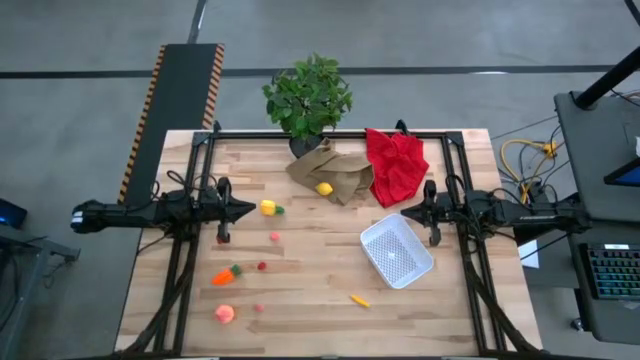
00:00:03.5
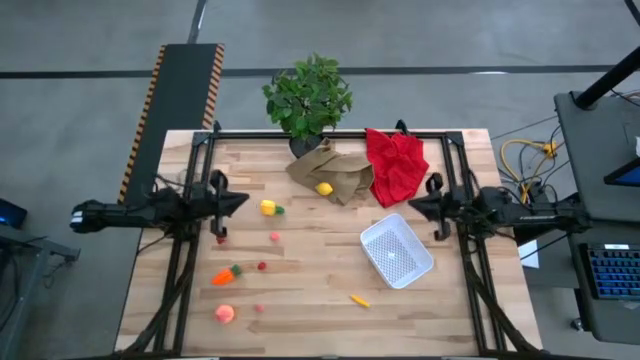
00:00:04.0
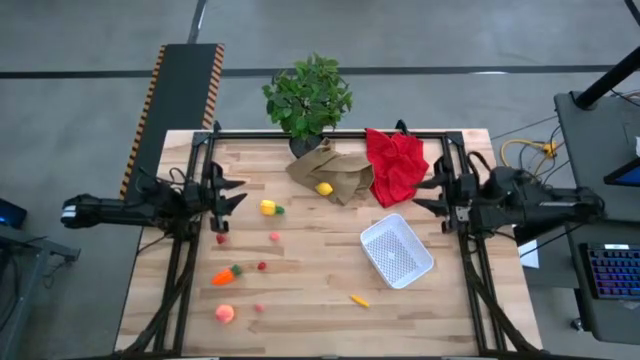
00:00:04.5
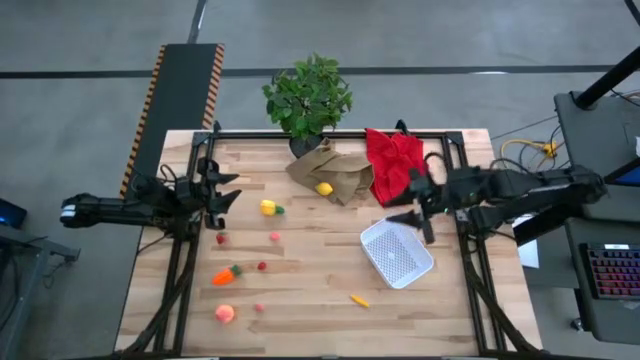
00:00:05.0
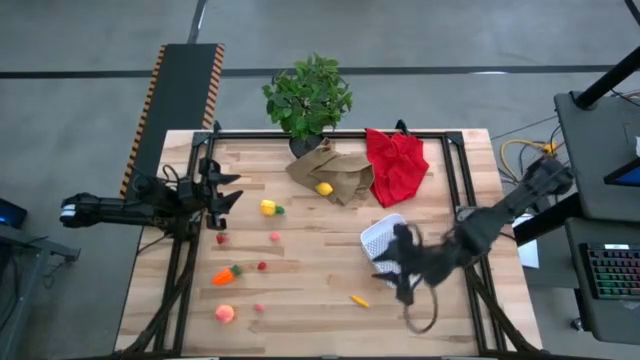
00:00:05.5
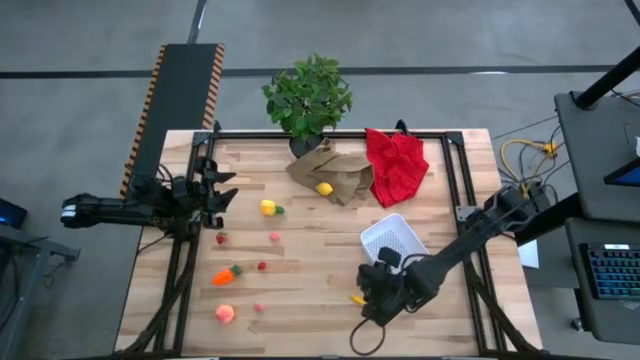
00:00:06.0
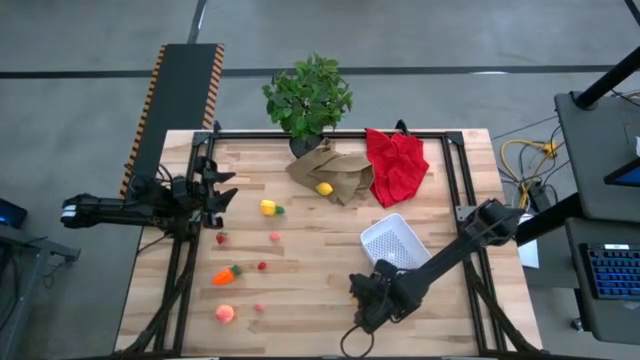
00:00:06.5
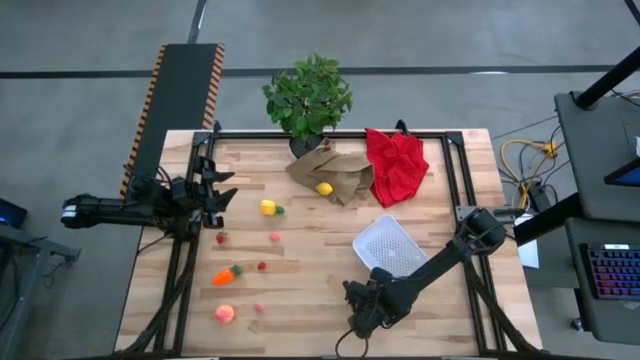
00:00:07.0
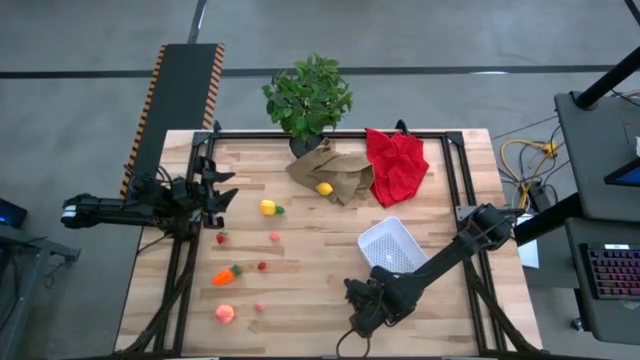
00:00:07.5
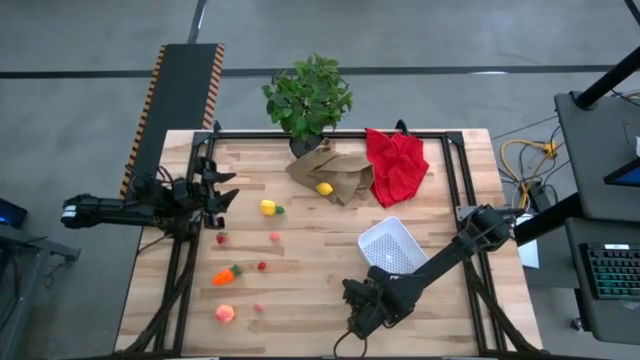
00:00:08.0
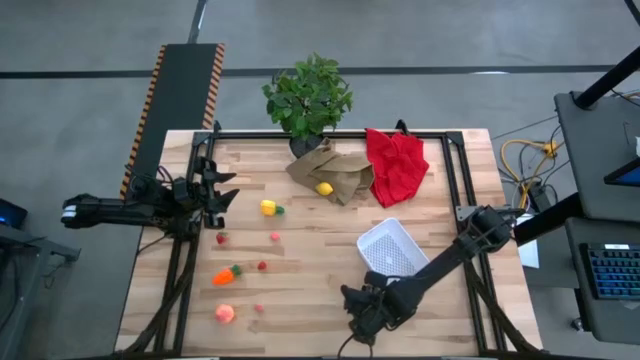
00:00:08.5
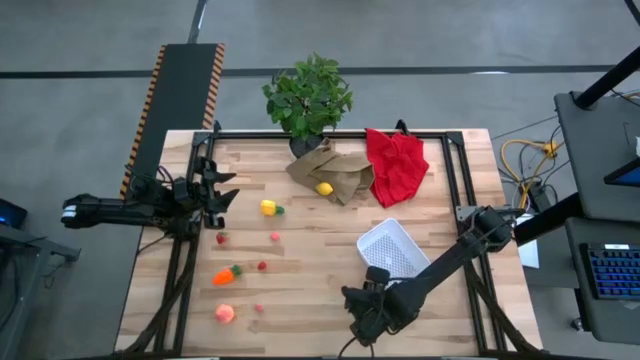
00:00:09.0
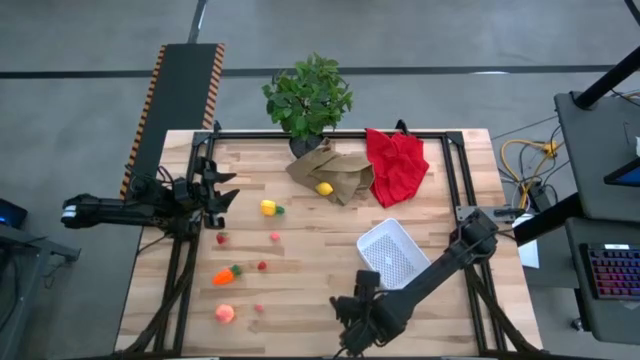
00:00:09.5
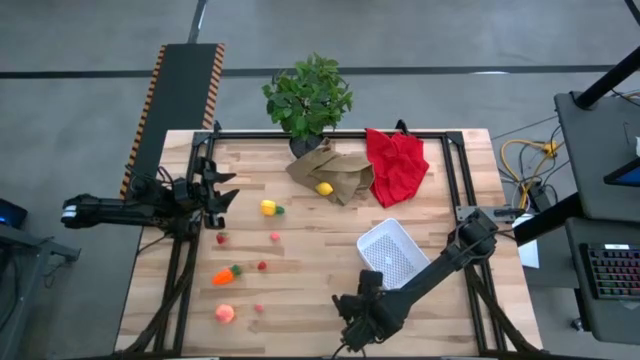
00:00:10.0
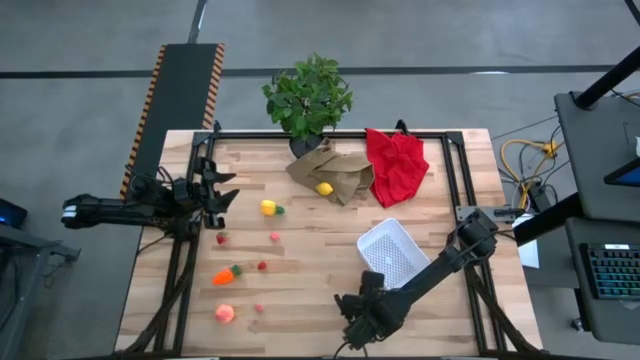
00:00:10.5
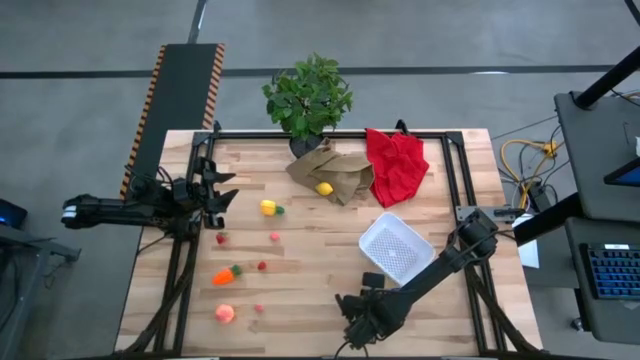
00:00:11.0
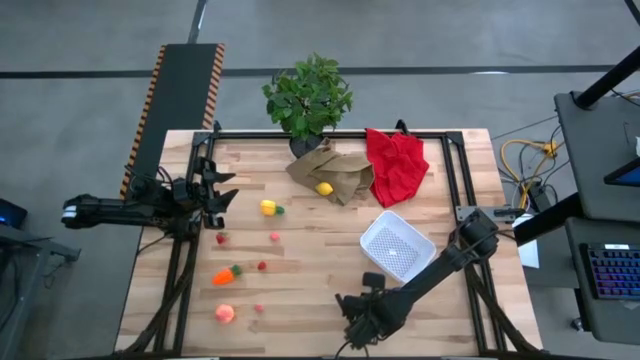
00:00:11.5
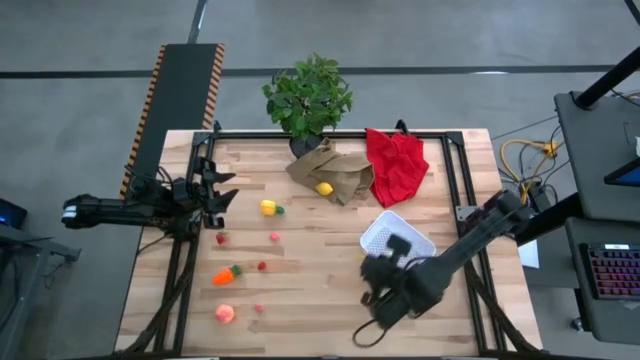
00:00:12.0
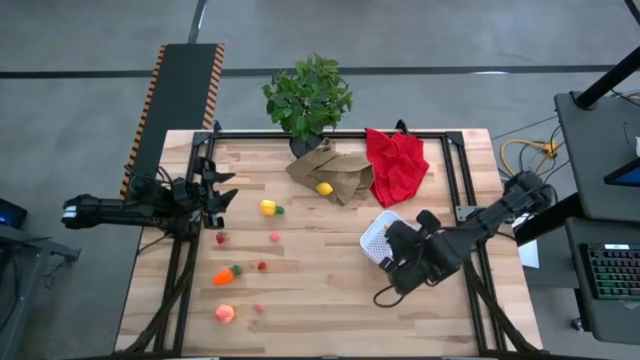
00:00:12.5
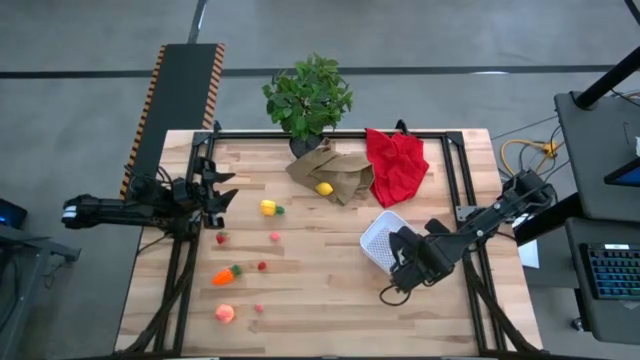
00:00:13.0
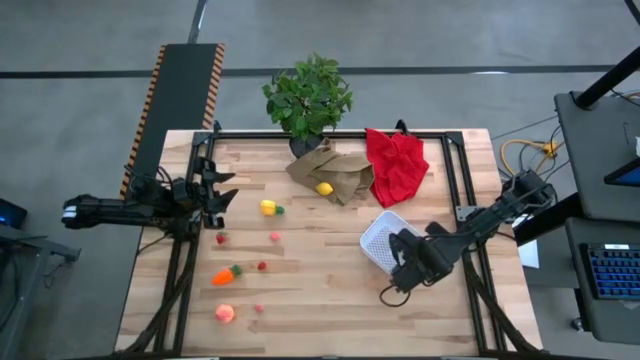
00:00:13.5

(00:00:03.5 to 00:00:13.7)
Task: Pick and placing Produce into tupperware
Put the yellow corn into the white bin

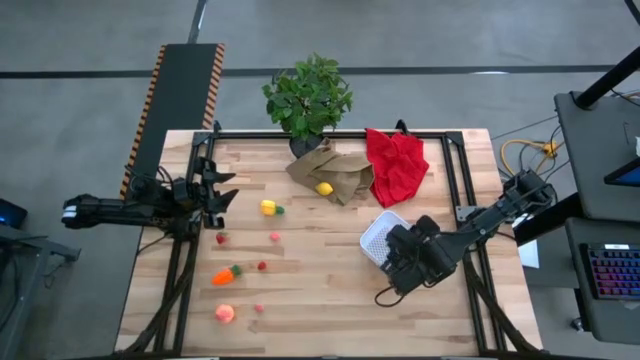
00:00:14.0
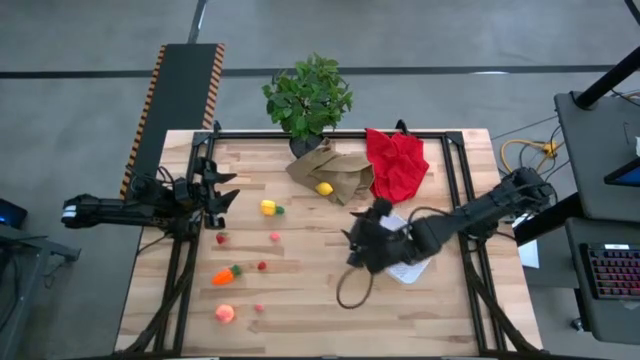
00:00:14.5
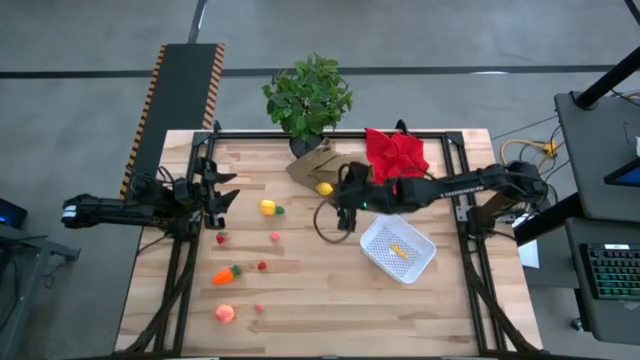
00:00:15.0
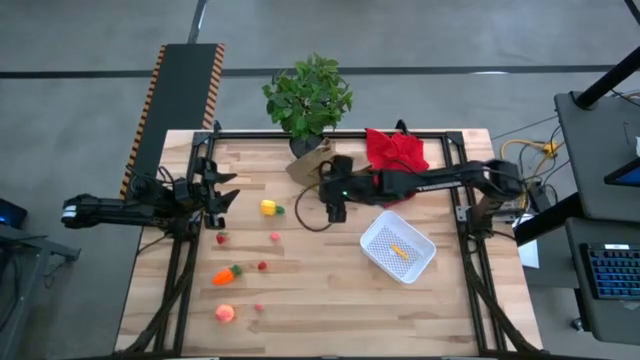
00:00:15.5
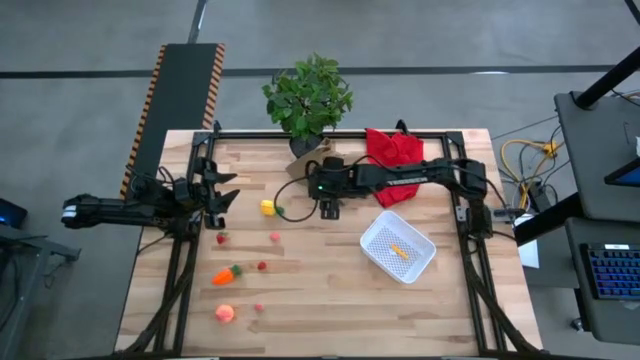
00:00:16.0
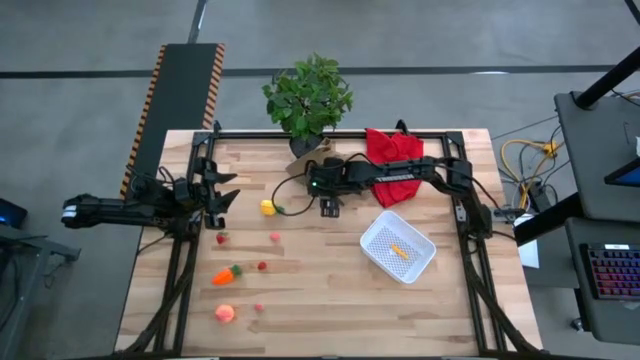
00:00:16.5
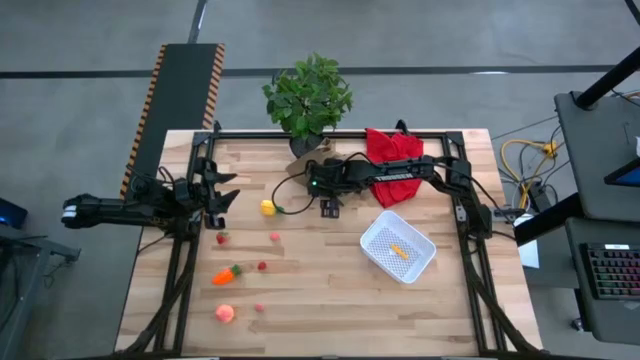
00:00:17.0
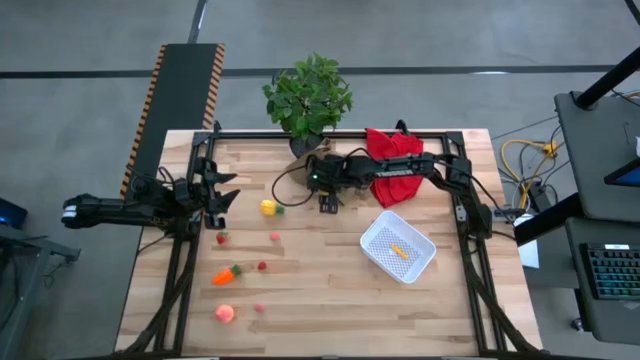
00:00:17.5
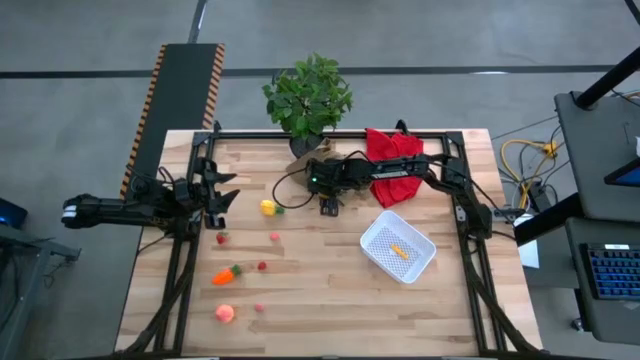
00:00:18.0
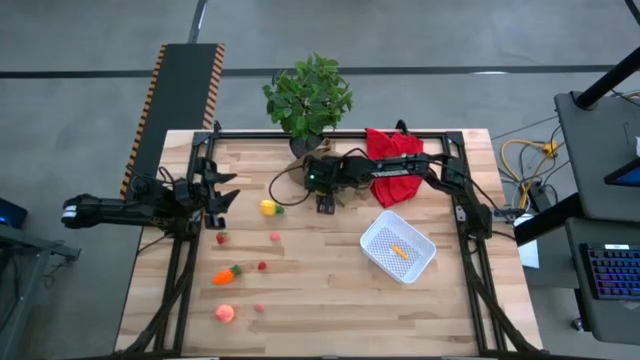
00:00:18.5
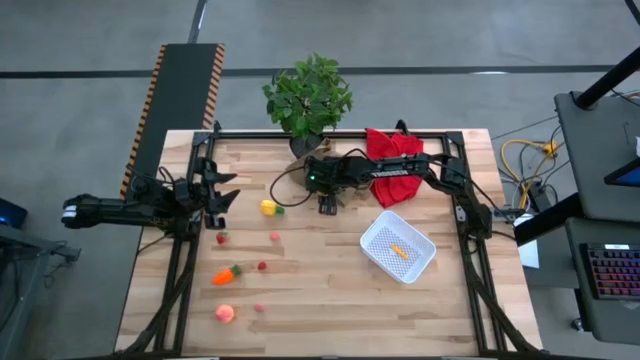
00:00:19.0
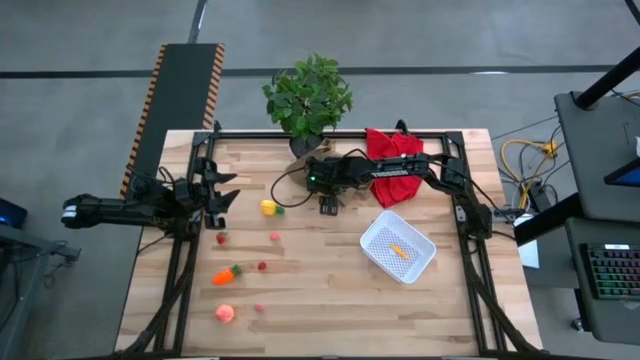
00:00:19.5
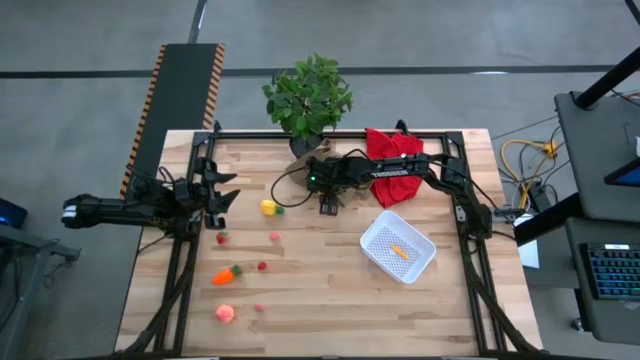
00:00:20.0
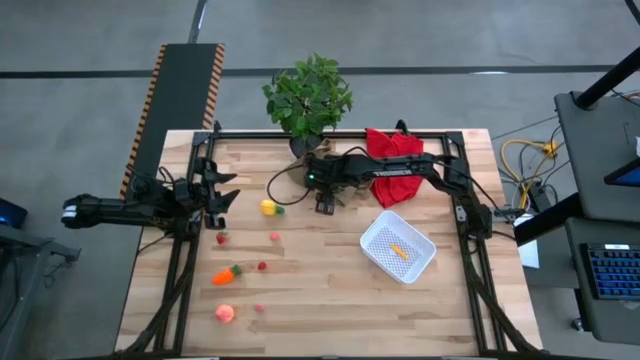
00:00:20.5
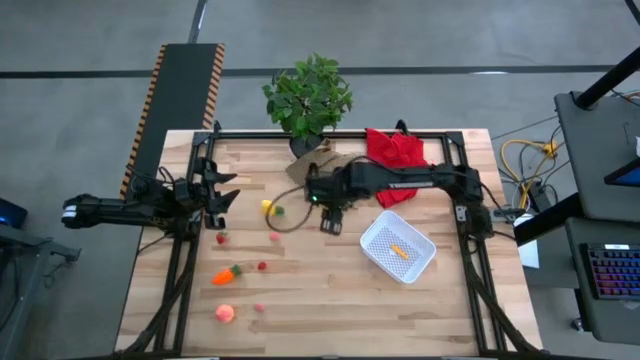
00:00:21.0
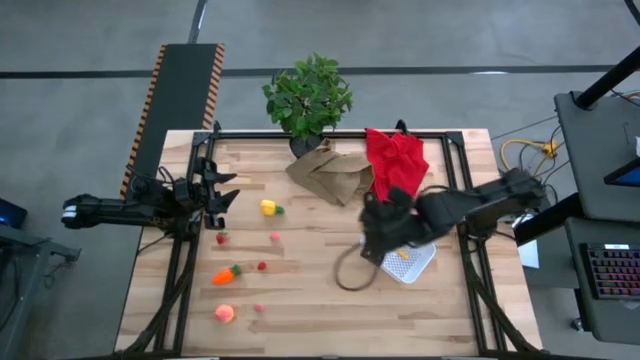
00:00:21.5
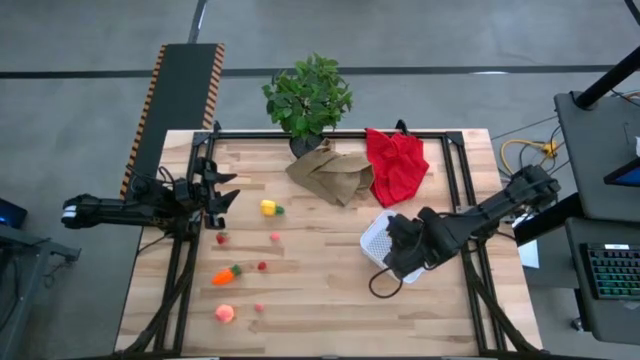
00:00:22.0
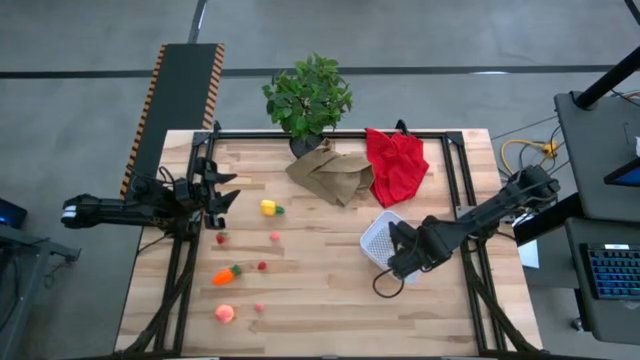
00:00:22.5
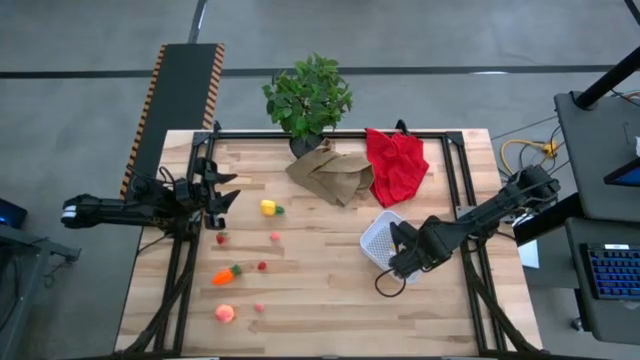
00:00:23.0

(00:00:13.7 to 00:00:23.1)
Put the yellow lemon into the white bin

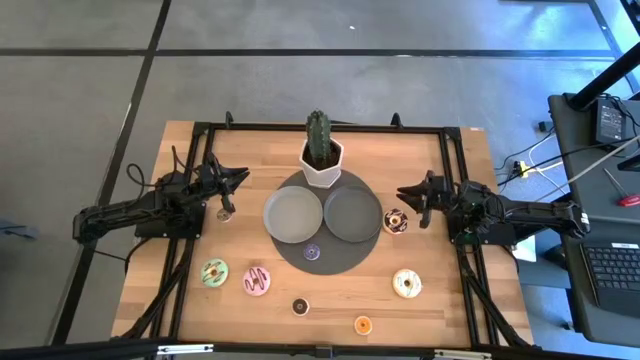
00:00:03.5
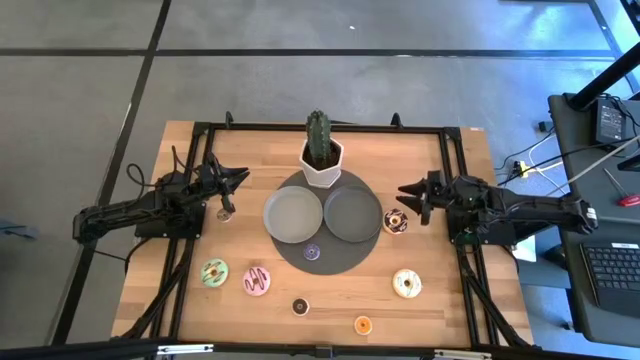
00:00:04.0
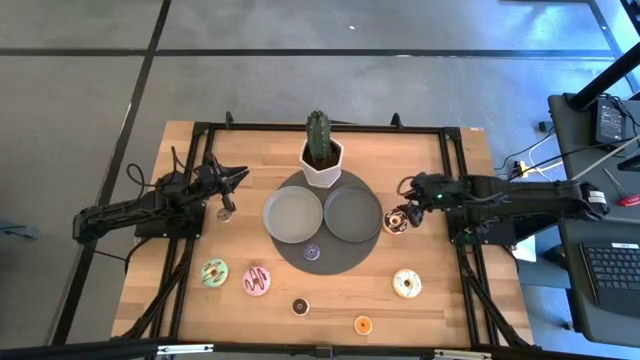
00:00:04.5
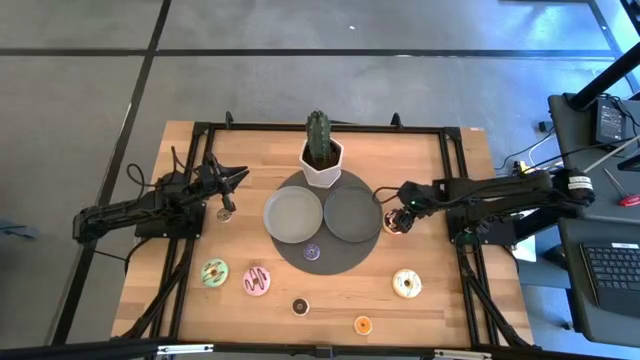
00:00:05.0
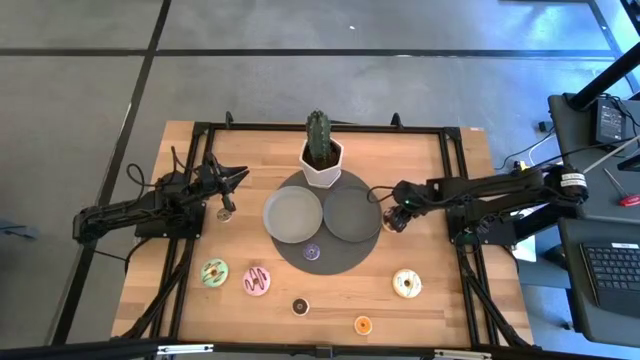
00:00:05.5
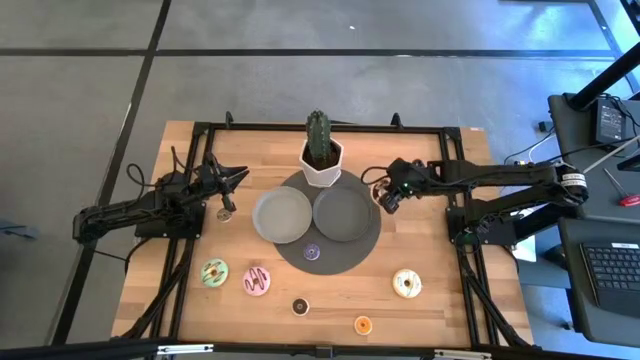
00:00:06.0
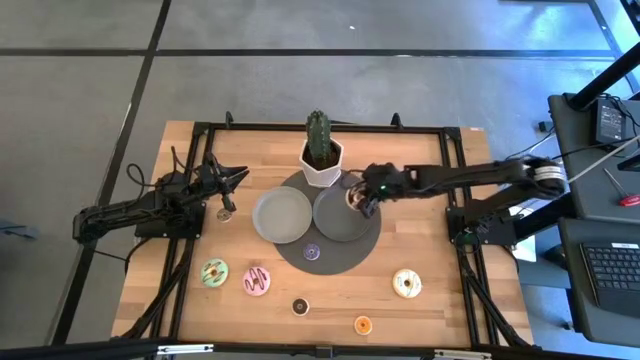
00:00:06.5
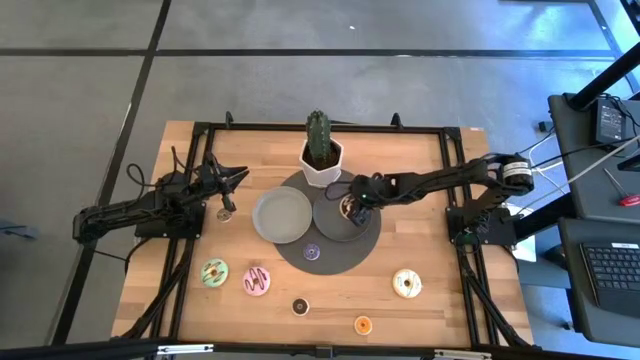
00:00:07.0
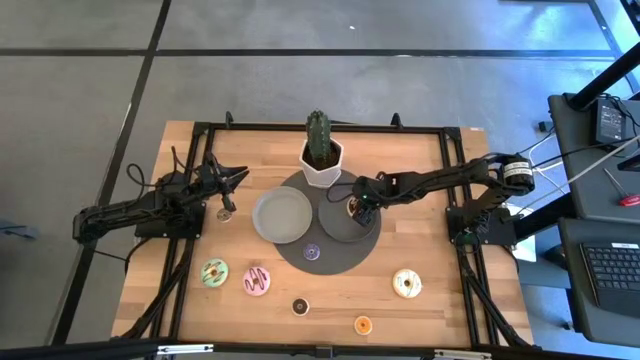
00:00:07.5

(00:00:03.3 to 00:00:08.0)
Task: Pick & Place donuts
Put the big black donut on the dark gray plate
